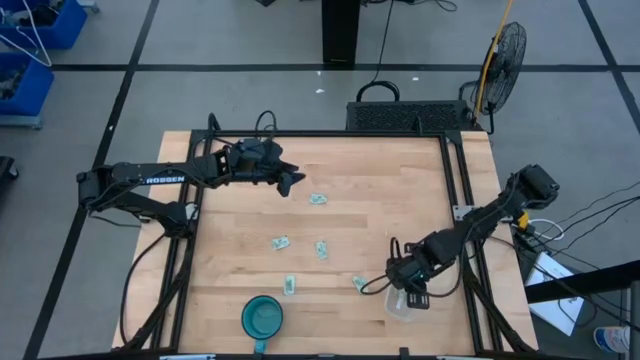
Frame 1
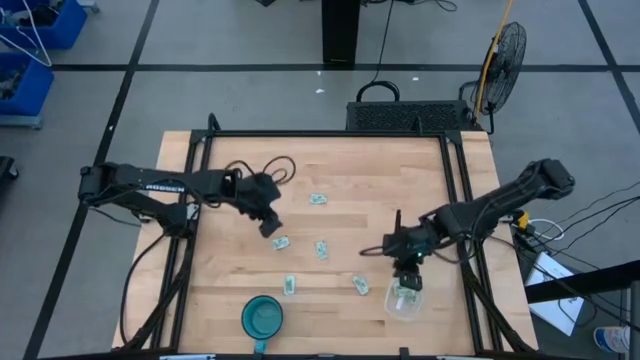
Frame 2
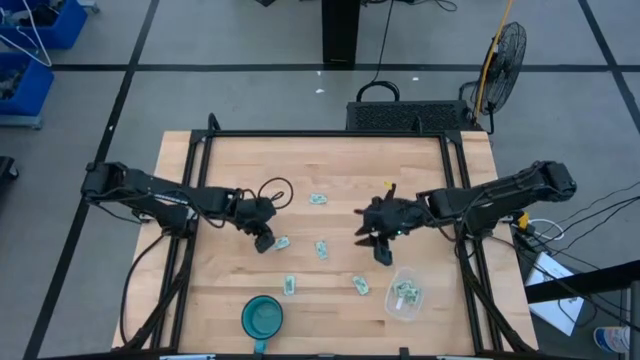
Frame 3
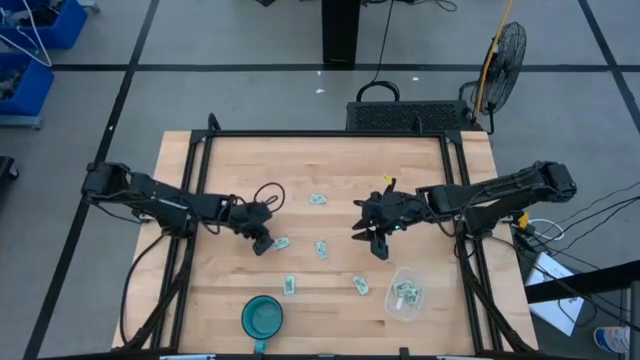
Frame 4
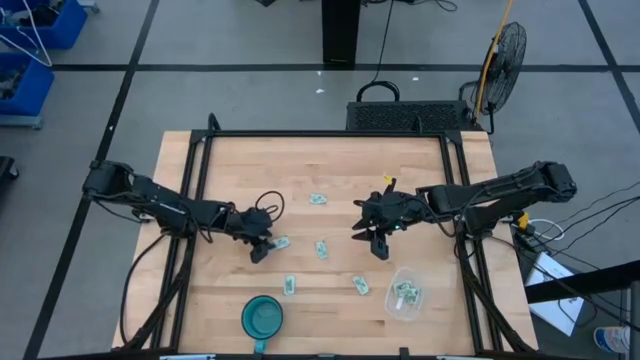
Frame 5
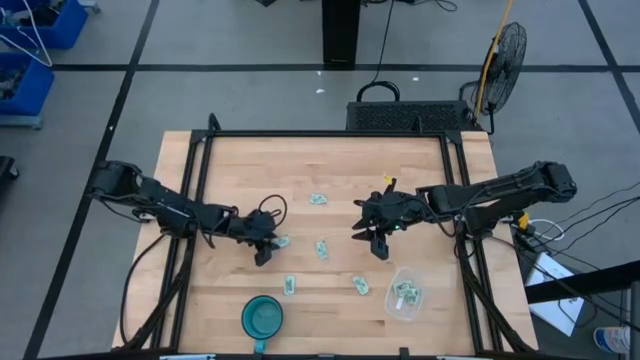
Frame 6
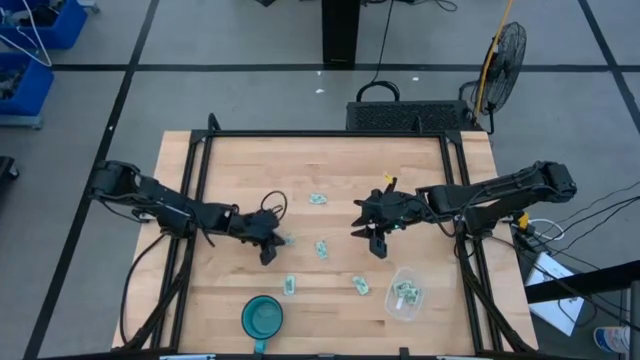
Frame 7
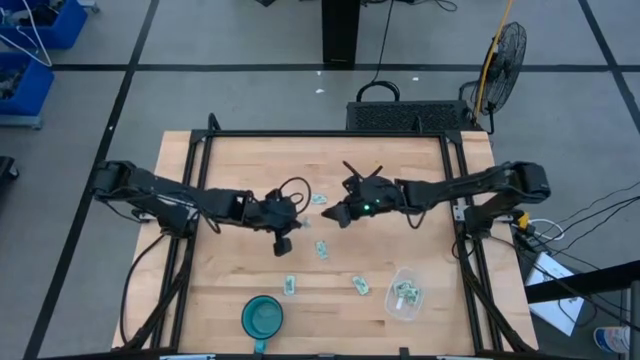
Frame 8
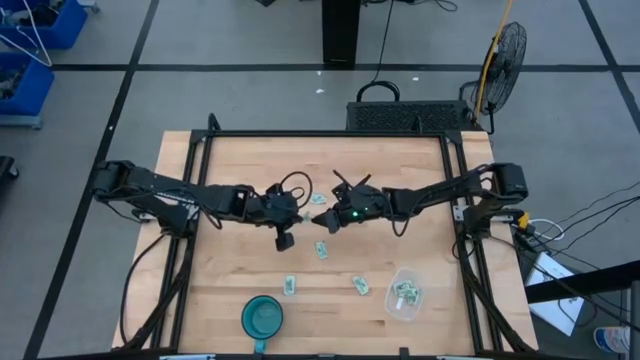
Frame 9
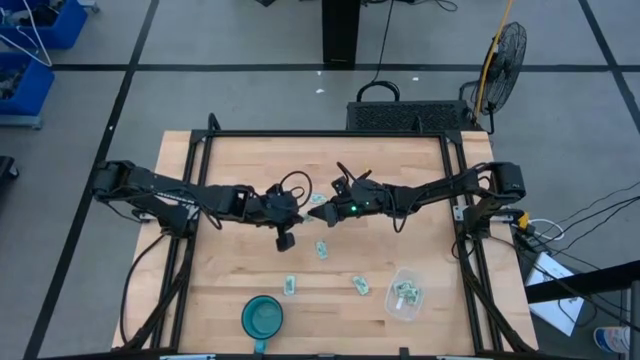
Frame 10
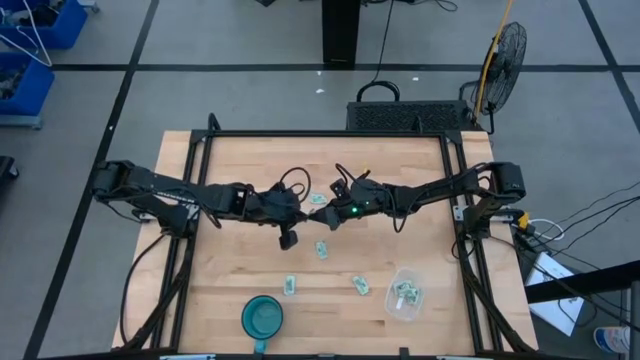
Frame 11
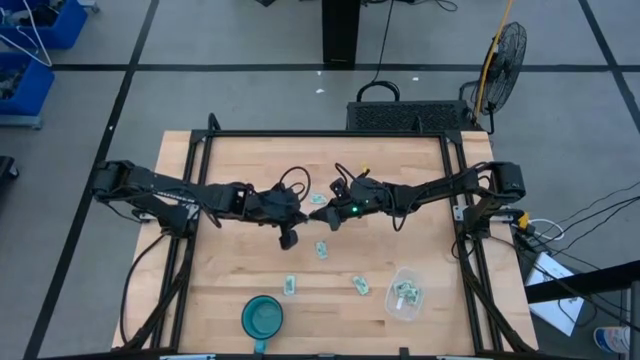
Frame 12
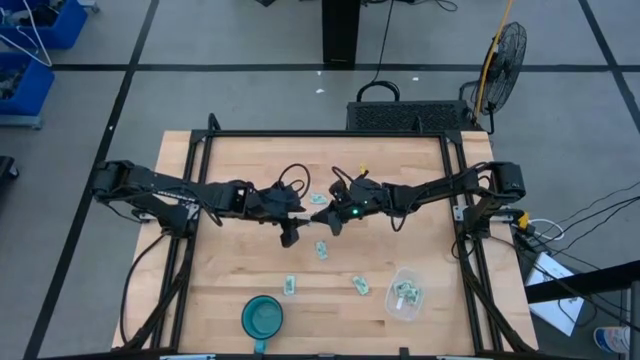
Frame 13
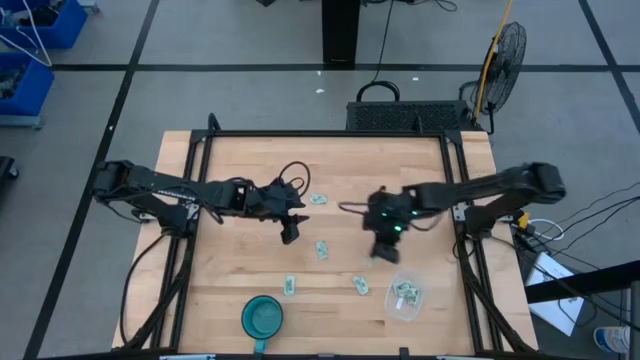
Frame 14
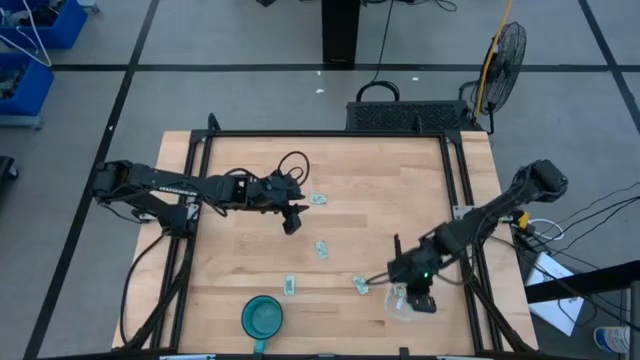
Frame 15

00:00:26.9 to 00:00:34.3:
Task: Pick and place Stevia / Truvia into bins
Put the light green stevia packet into the transparent bin

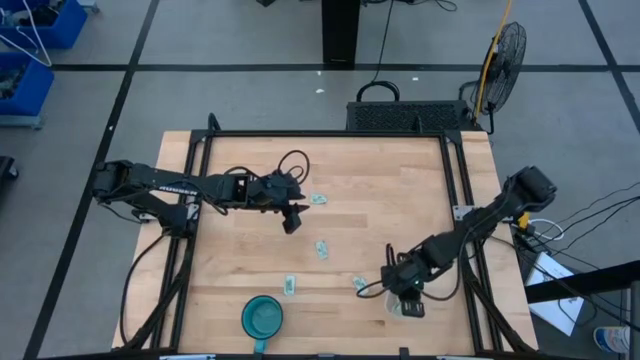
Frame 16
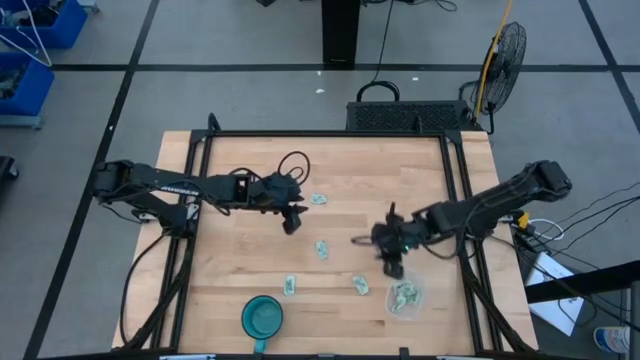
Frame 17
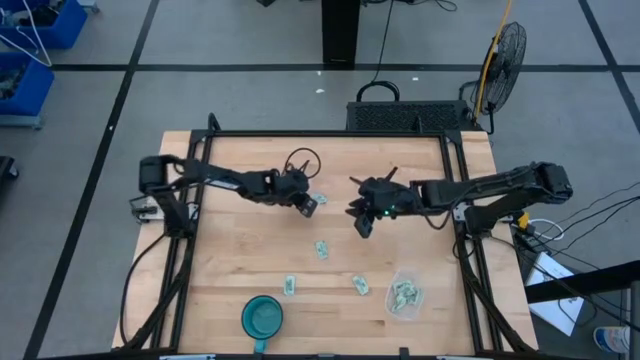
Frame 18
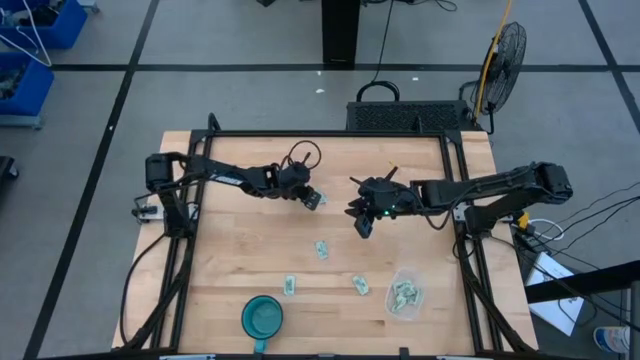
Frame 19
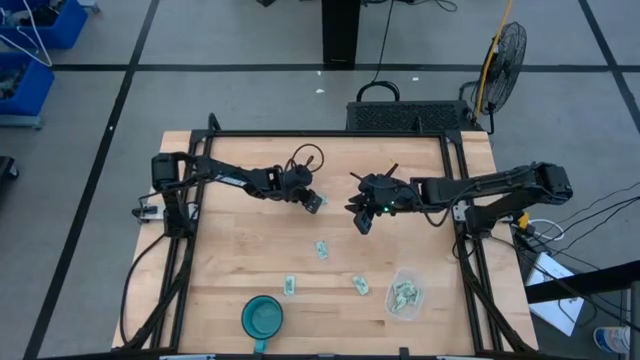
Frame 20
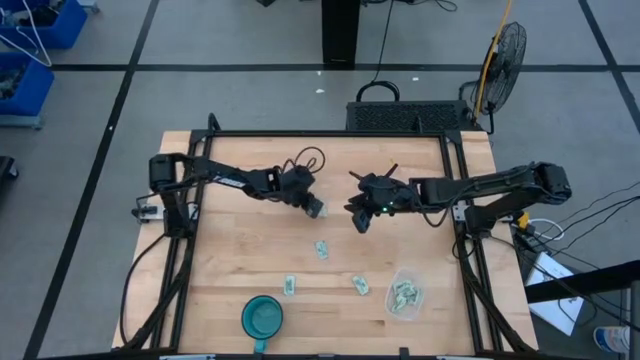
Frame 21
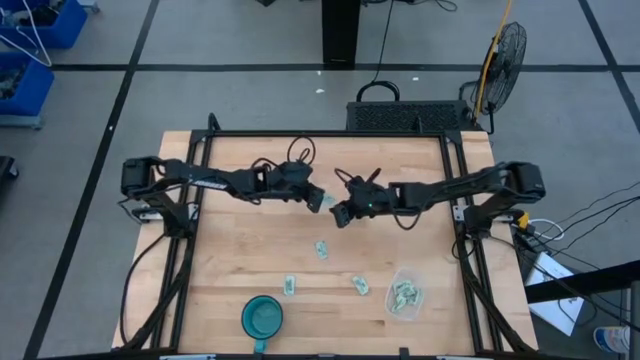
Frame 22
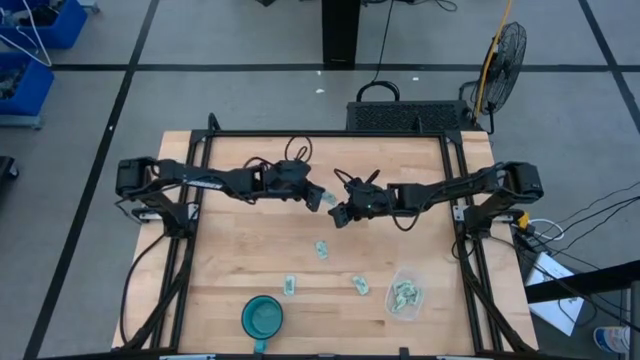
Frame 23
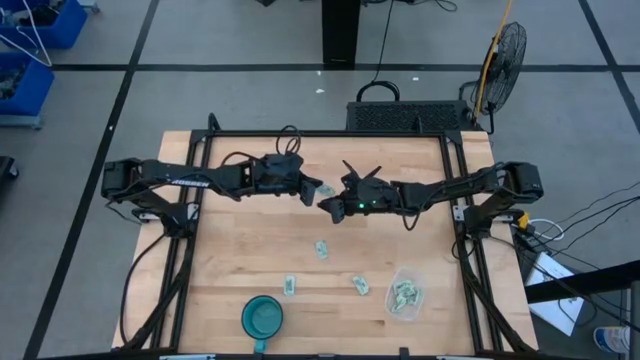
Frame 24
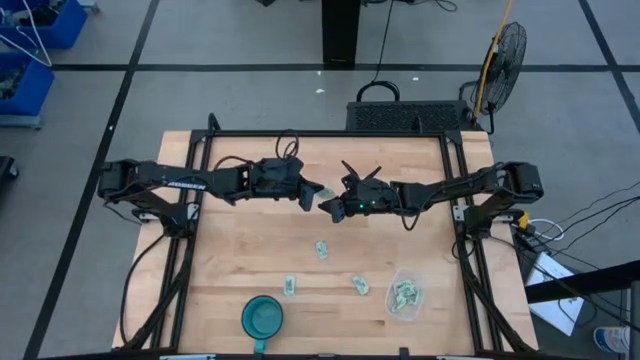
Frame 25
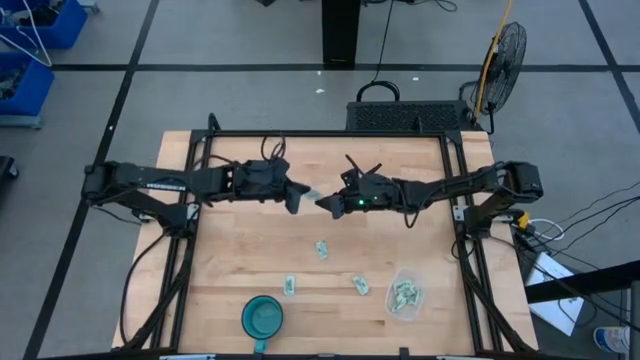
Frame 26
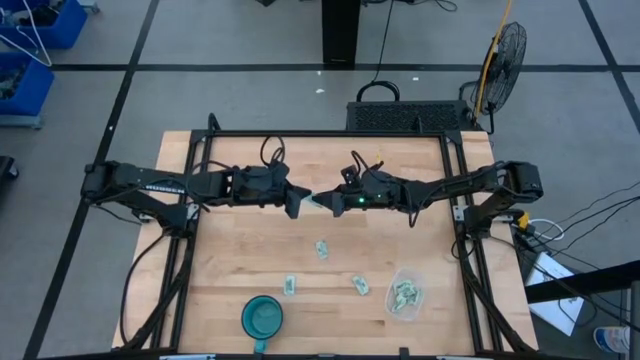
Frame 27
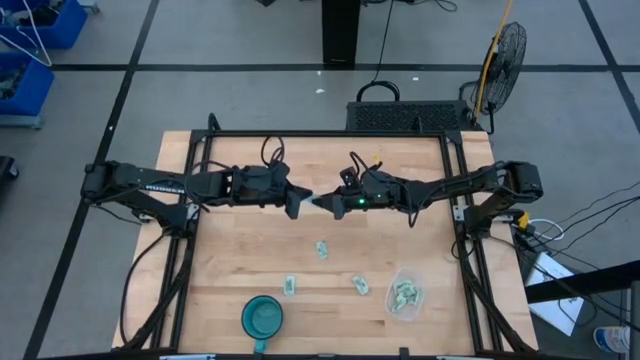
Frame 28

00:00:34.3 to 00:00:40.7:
Put the light green stevia packet into the transparent bin

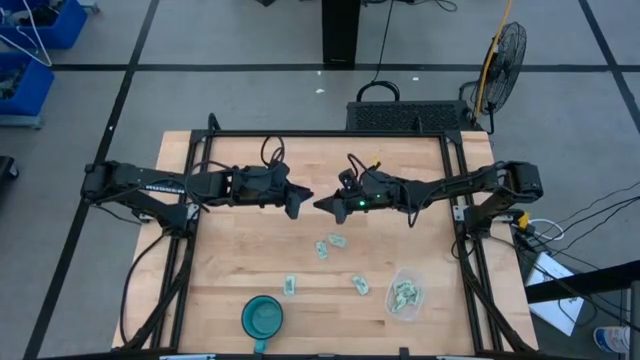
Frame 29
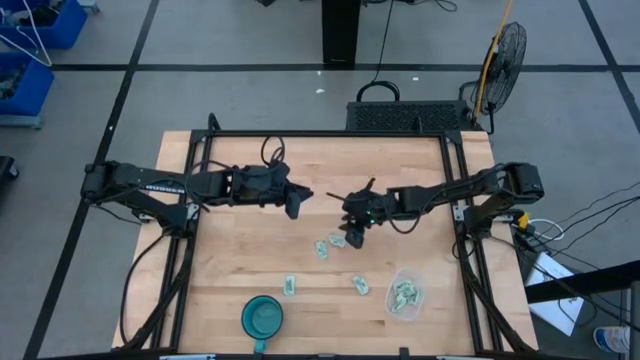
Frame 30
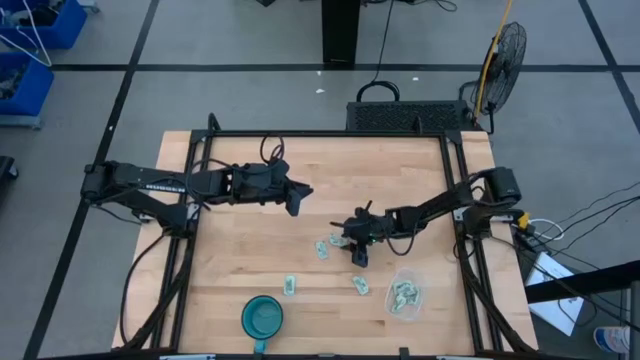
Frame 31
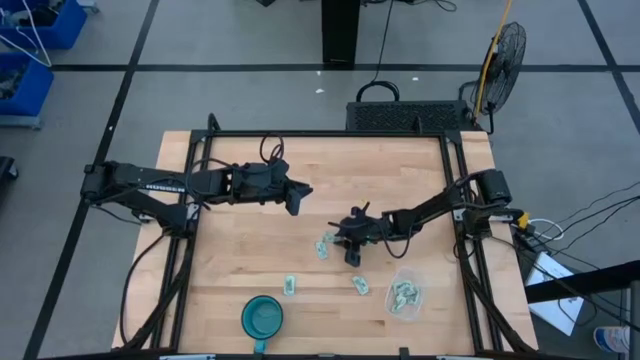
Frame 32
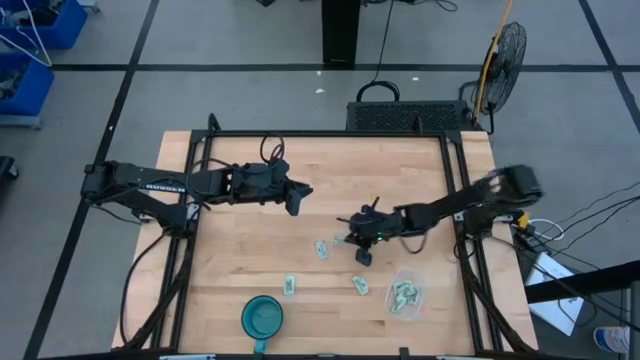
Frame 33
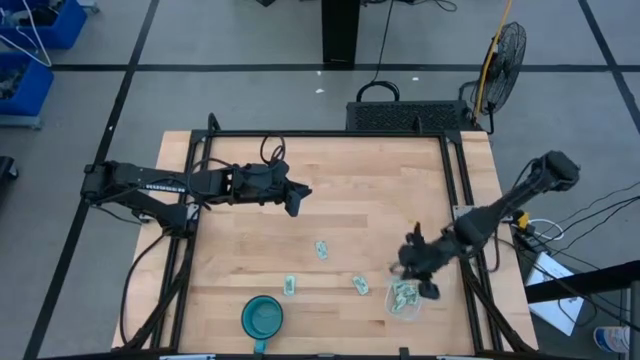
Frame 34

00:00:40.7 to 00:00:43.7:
Put the light green stevia packet into the transparent bin

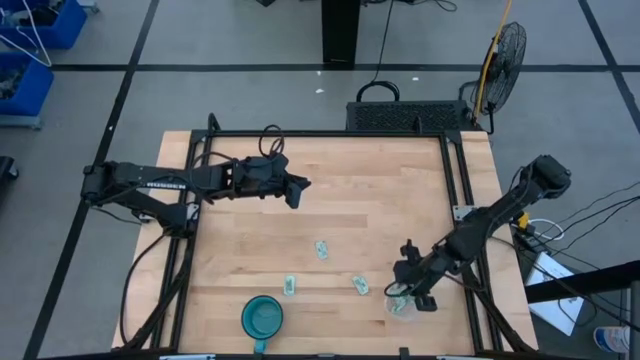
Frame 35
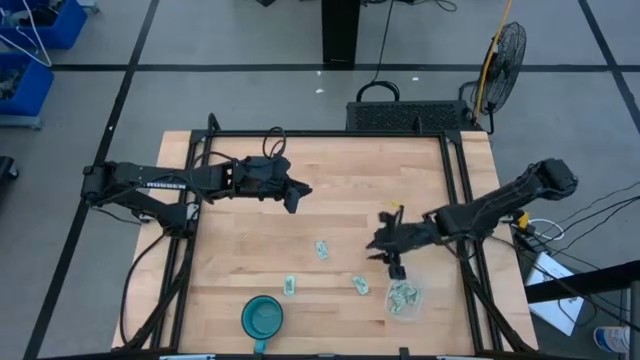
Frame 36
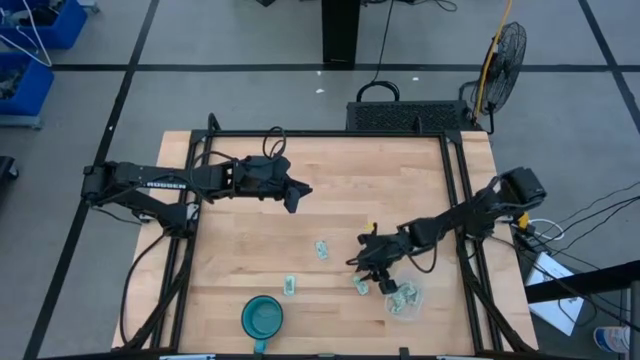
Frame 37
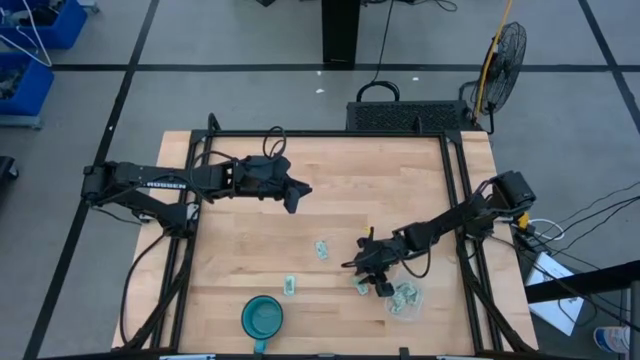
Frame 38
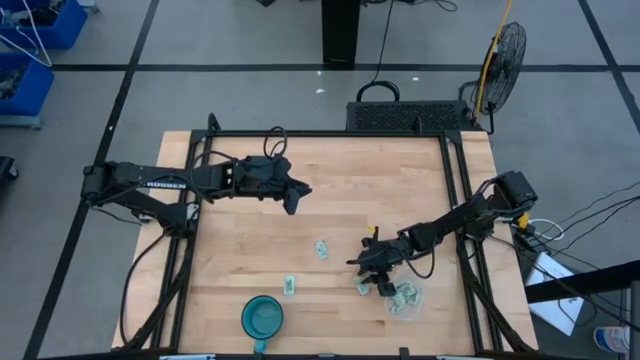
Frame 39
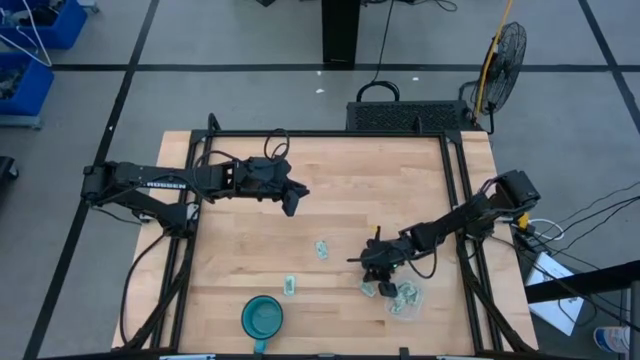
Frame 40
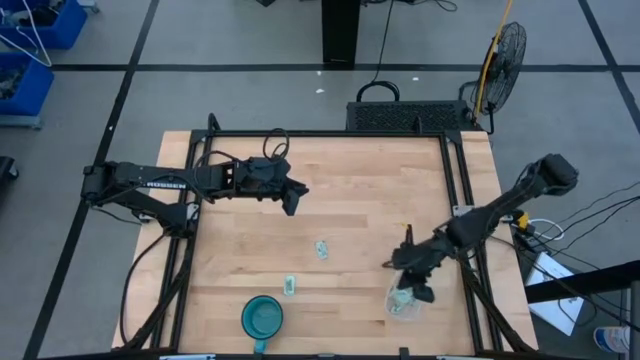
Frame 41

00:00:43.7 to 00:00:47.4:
Put the bottom right light green stevia packet into the transparent bin
